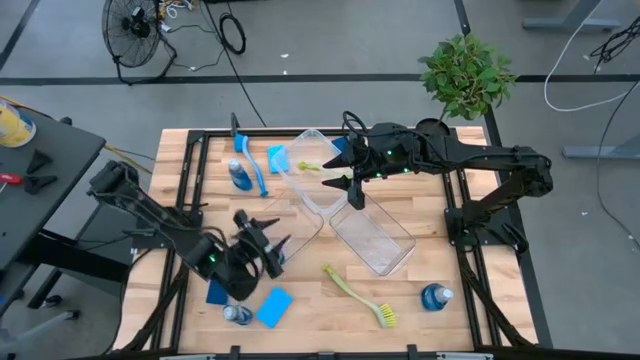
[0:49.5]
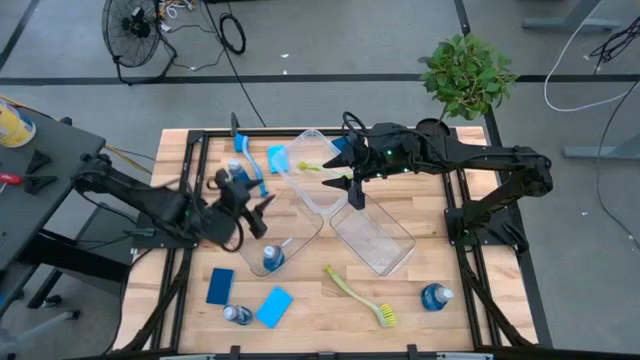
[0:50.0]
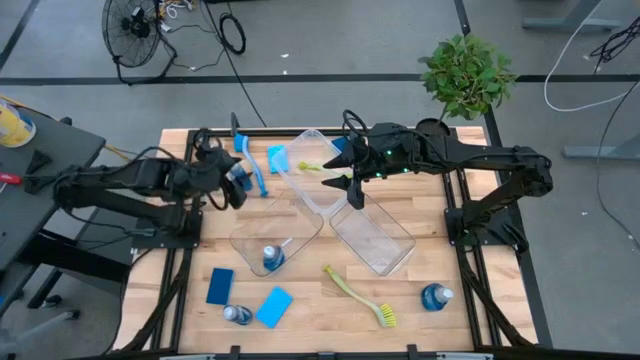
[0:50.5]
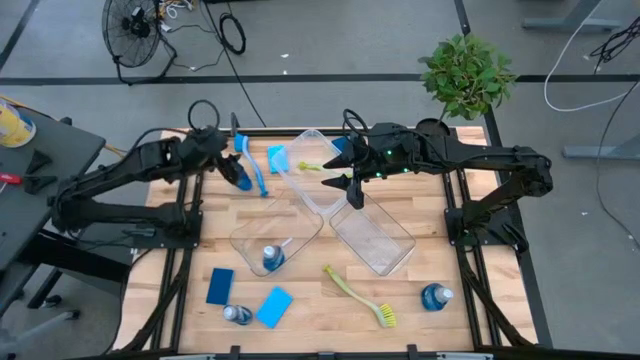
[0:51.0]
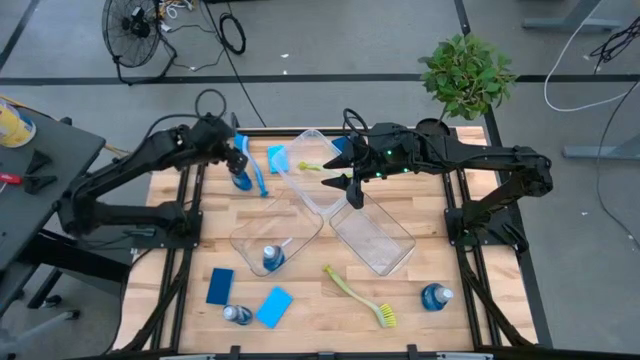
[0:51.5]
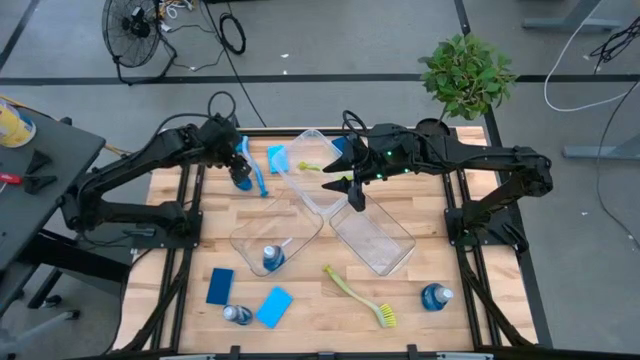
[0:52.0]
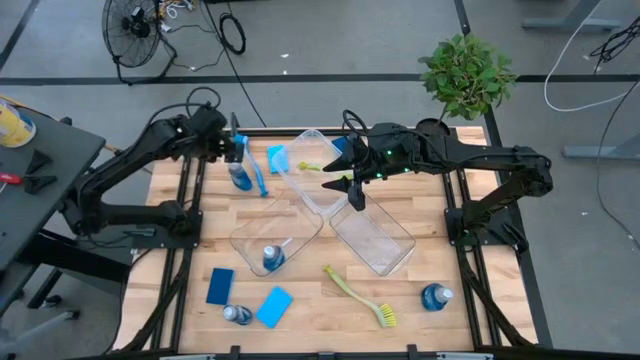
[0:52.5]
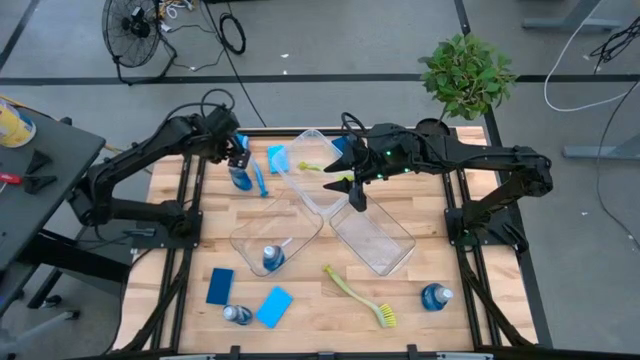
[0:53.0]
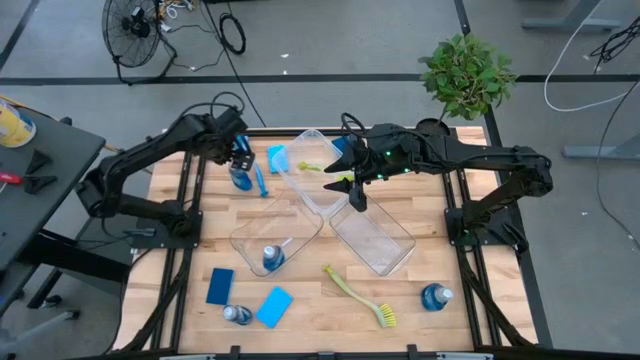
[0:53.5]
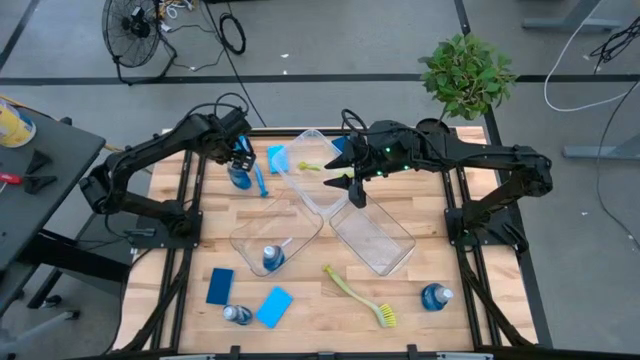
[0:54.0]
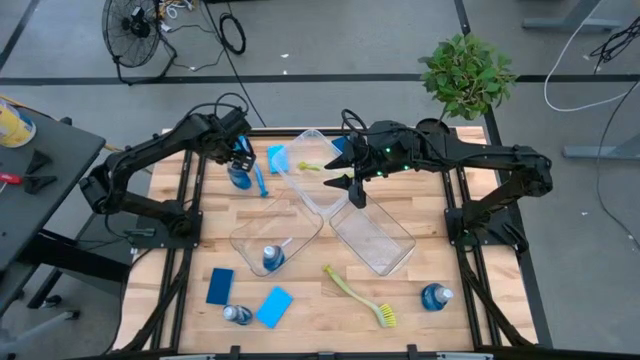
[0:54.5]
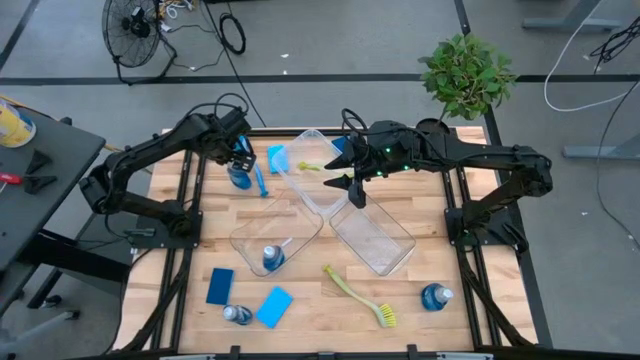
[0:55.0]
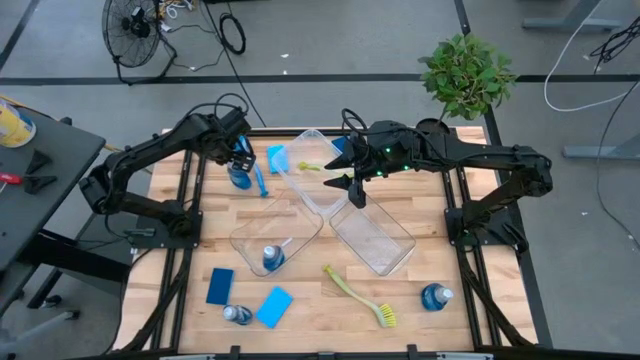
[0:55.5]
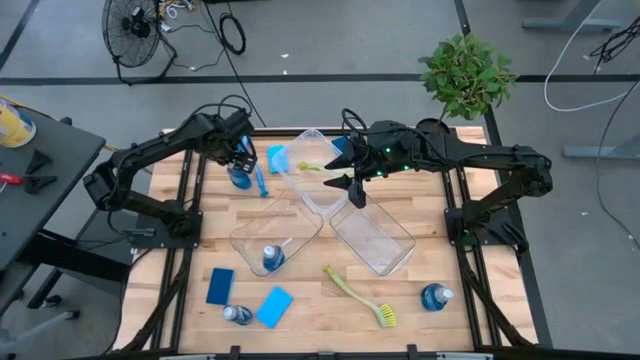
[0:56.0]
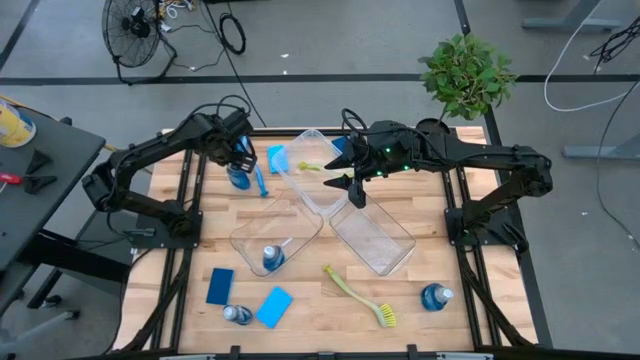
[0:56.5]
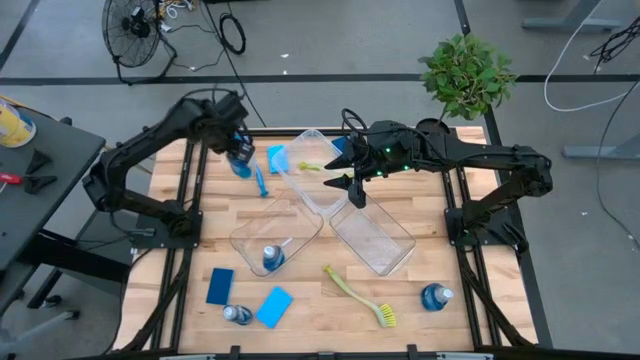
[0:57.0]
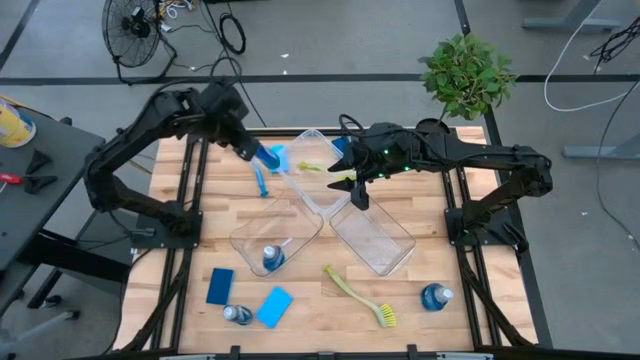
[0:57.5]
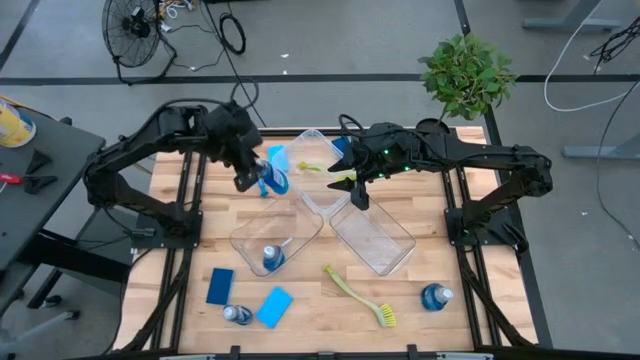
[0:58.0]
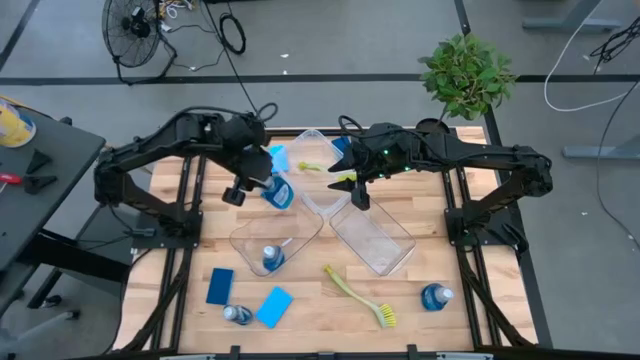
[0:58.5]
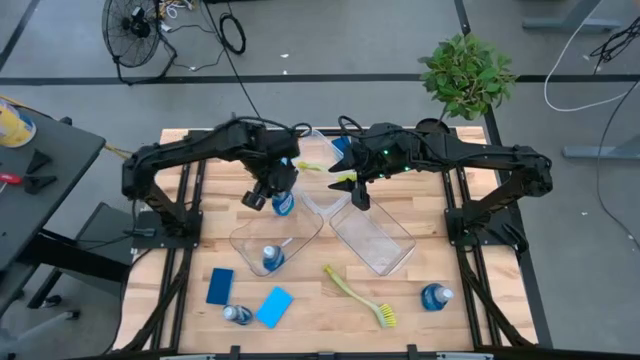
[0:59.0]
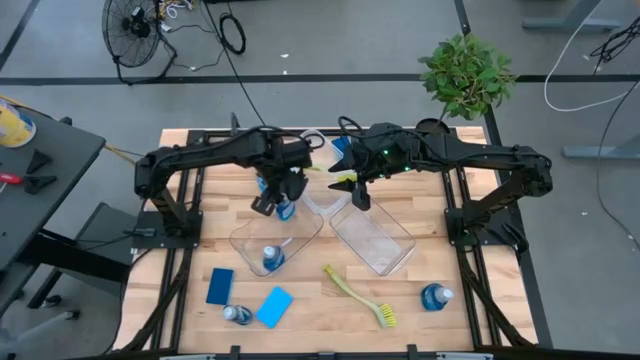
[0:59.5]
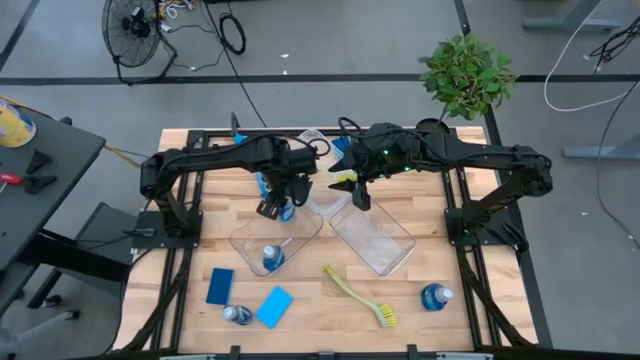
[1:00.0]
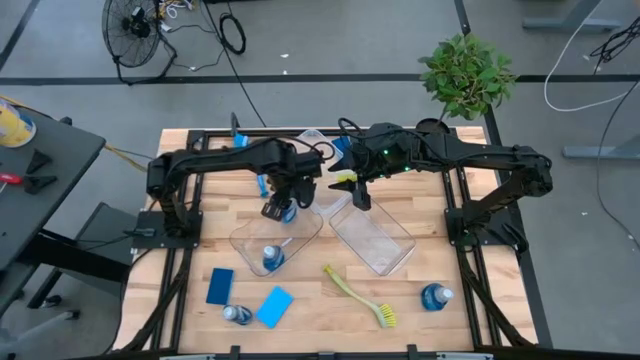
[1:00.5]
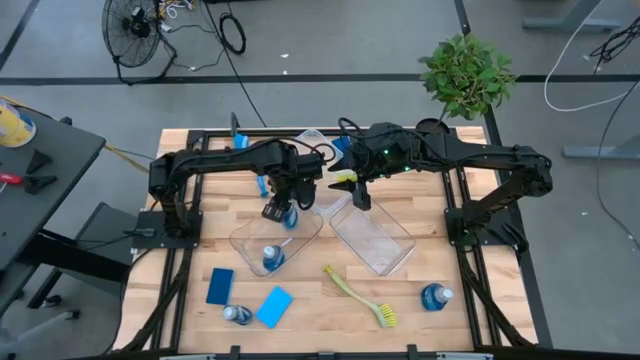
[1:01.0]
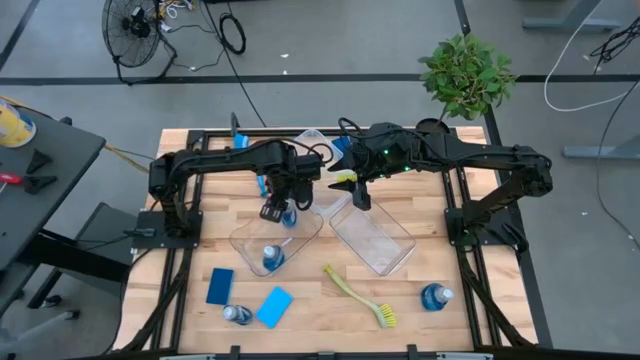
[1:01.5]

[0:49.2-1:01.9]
Task: Pick & Place Kitchen Sink Supplies
Put the blue dishwashing liquid into the left transparent bin

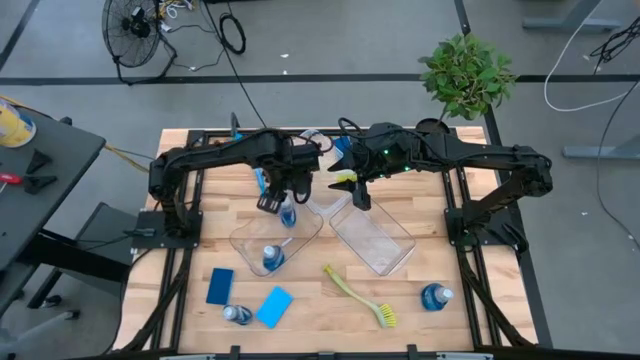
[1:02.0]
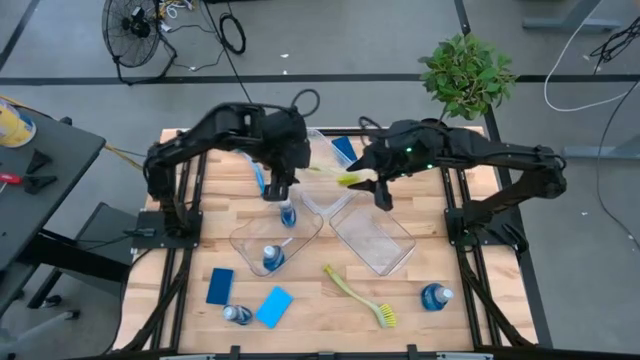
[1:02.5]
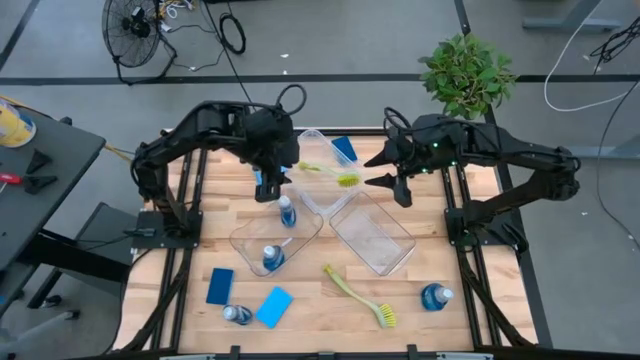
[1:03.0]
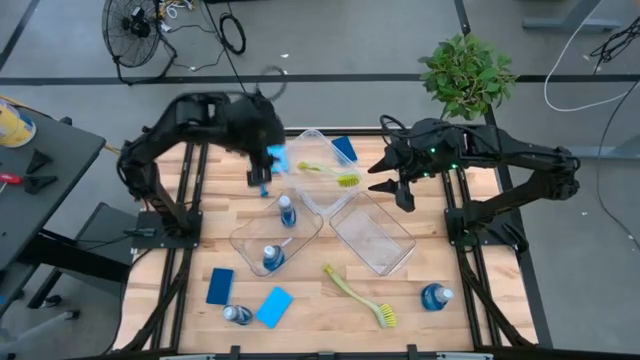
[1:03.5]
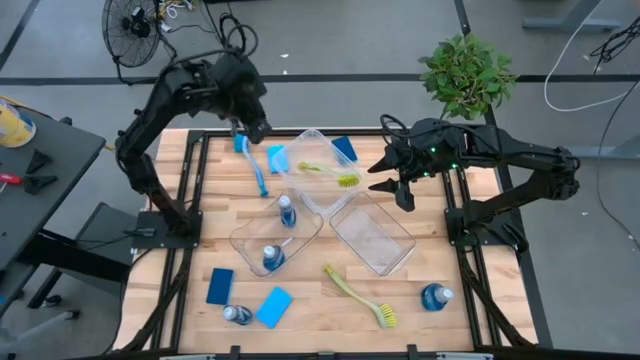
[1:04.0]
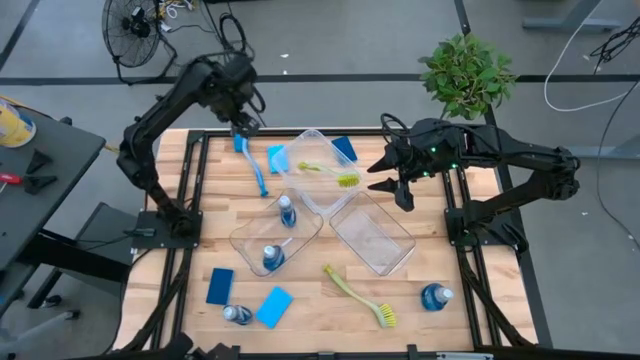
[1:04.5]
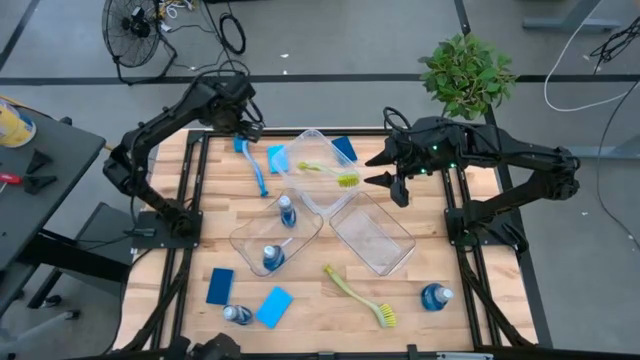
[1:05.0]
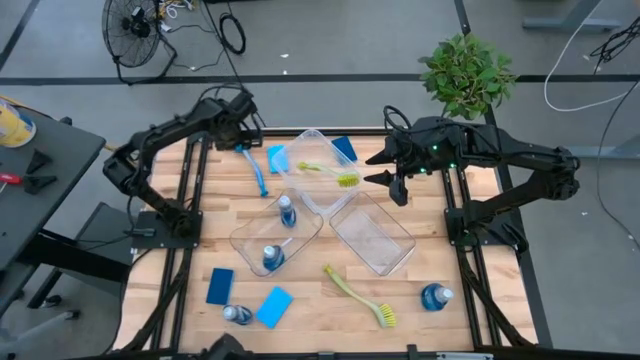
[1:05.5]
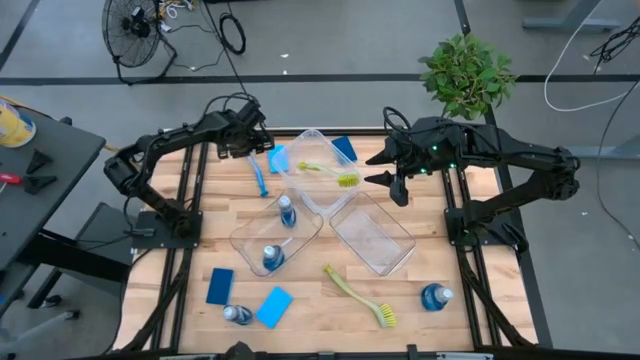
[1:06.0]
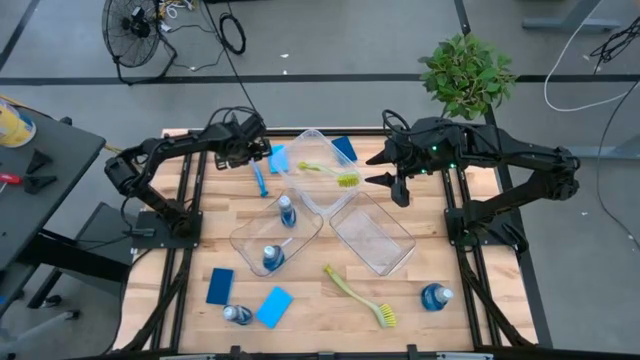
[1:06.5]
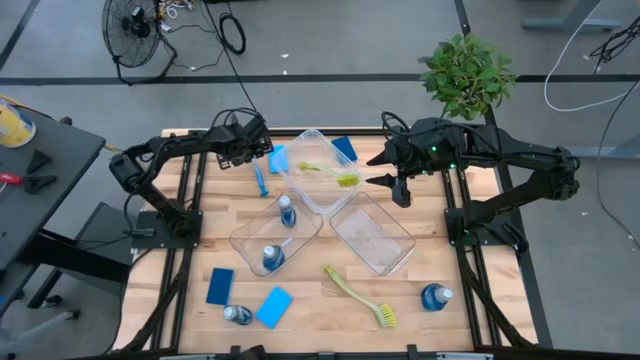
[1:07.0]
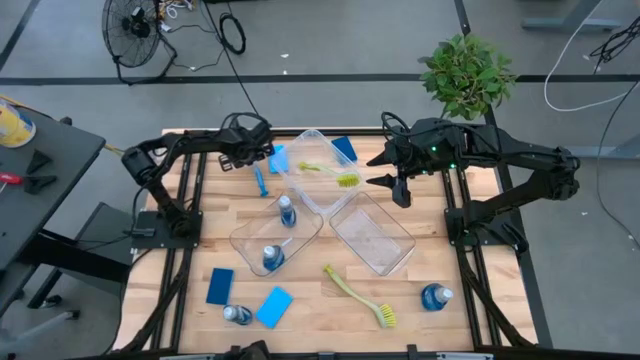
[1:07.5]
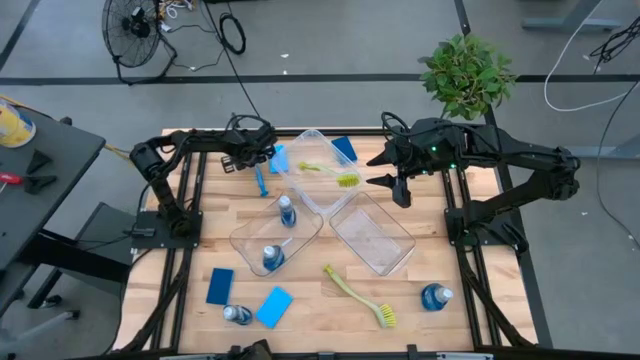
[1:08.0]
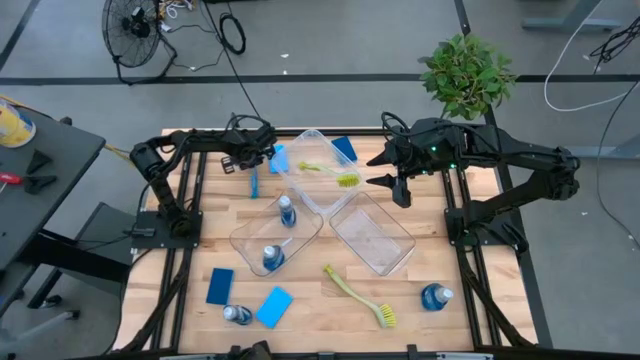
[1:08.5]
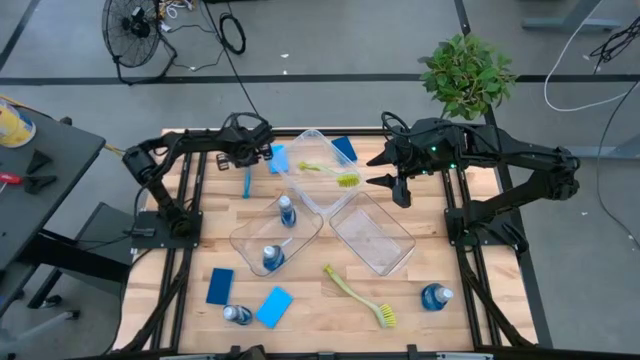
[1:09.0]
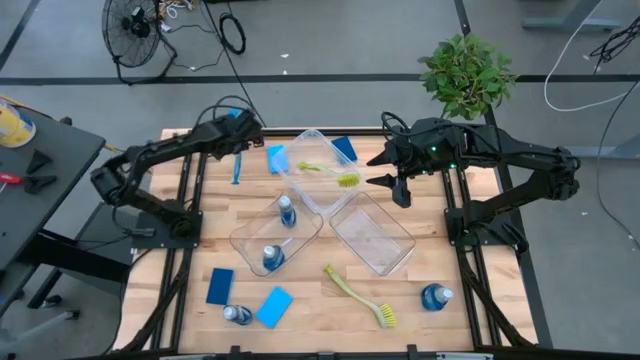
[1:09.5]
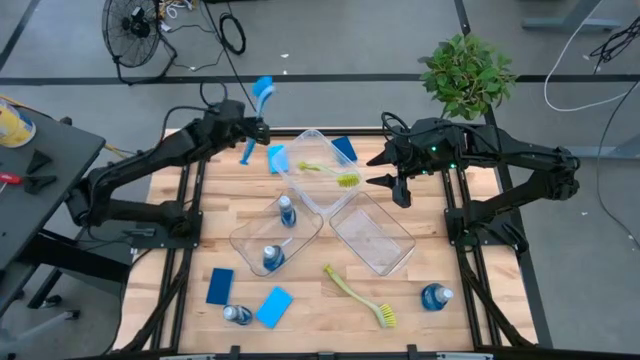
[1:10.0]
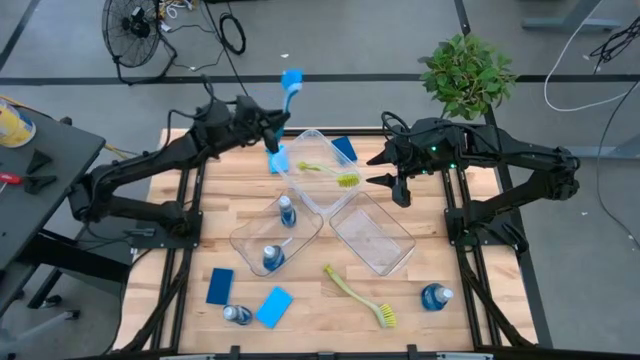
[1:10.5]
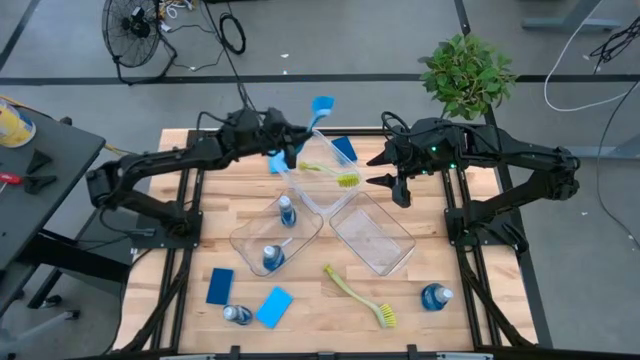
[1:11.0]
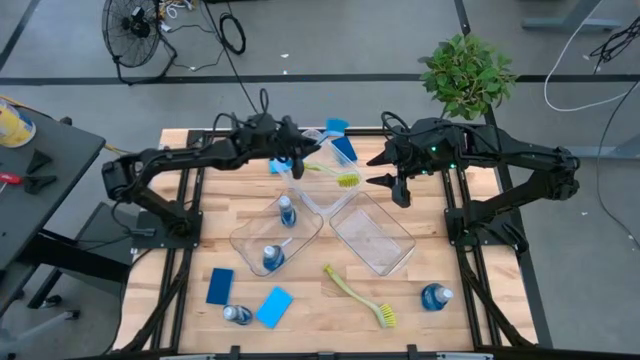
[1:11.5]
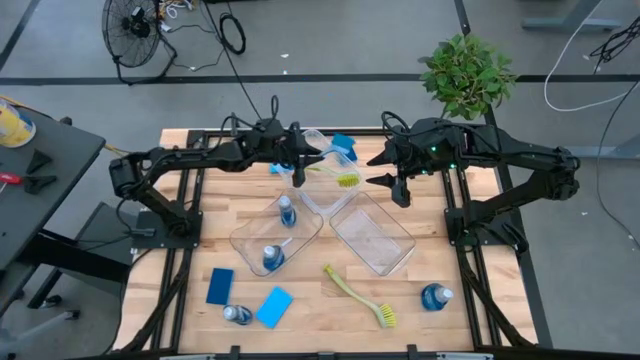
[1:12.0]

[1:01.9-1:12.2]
Put the blue toilet brush into the transparent container
